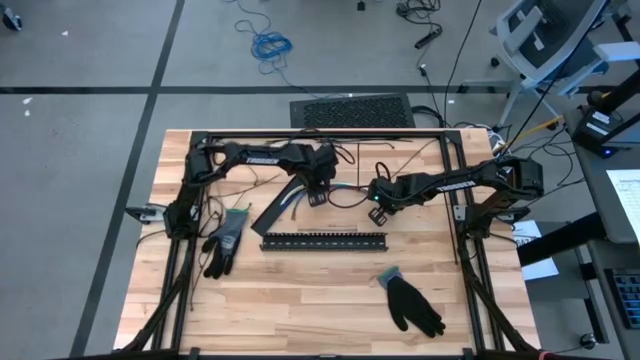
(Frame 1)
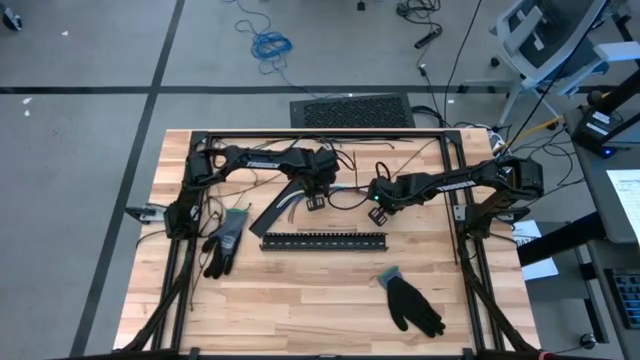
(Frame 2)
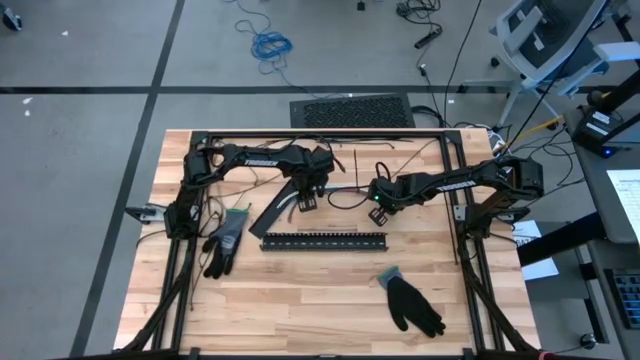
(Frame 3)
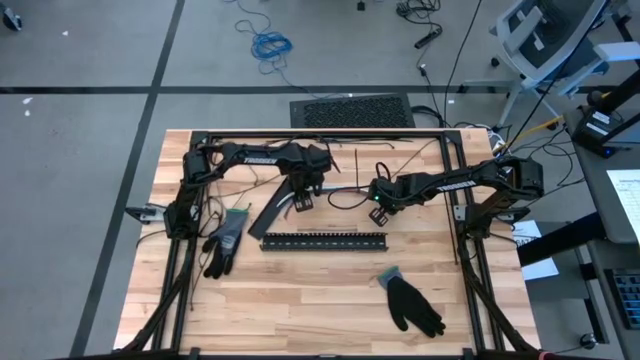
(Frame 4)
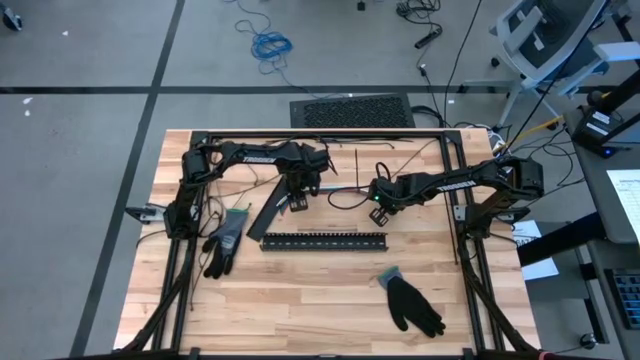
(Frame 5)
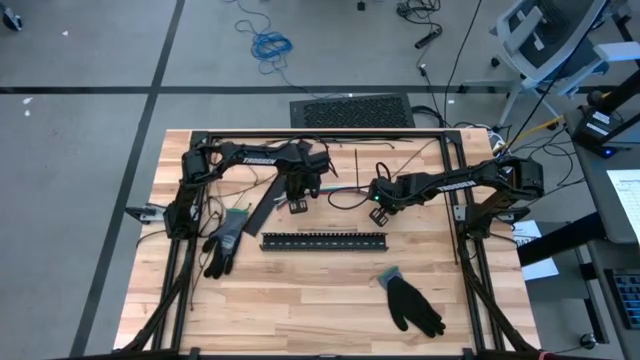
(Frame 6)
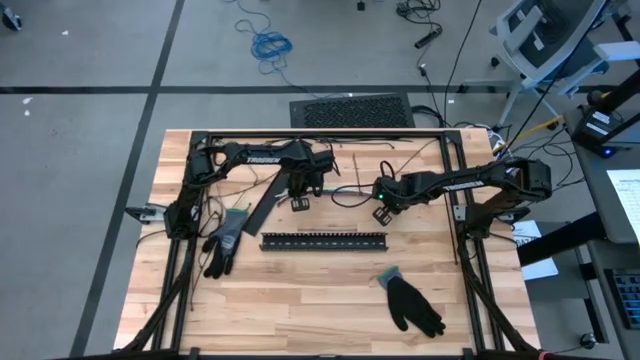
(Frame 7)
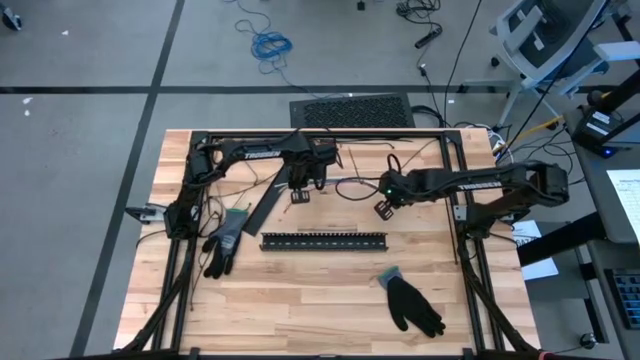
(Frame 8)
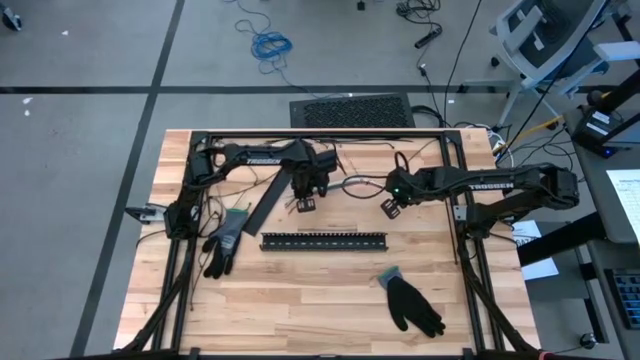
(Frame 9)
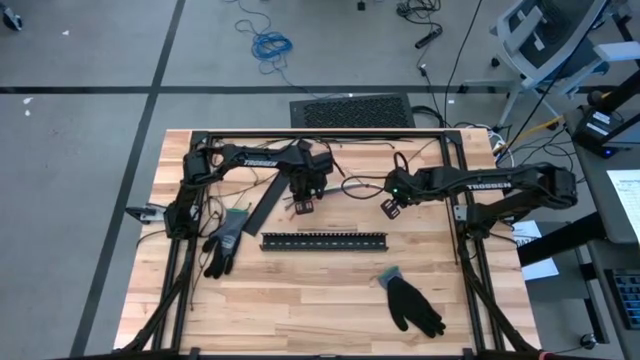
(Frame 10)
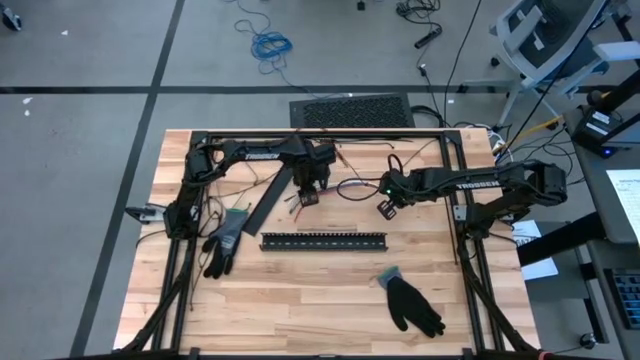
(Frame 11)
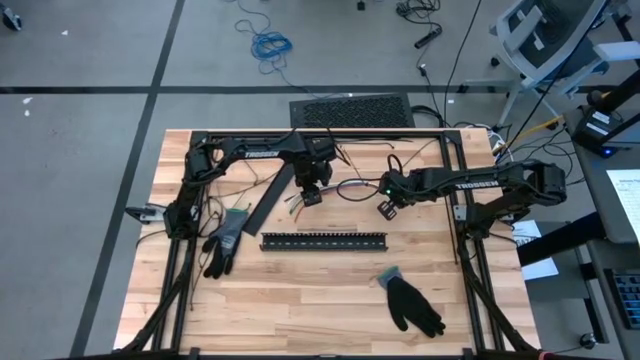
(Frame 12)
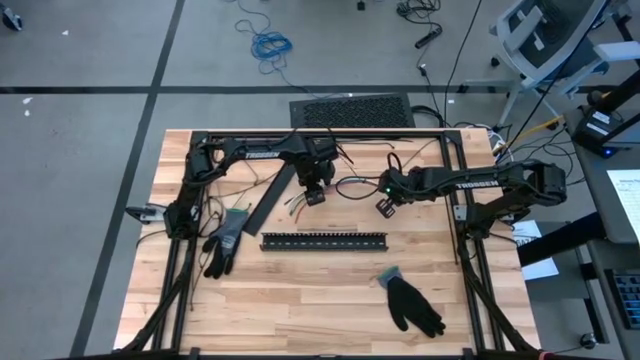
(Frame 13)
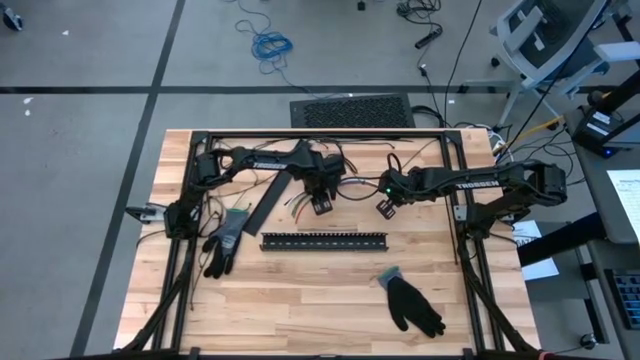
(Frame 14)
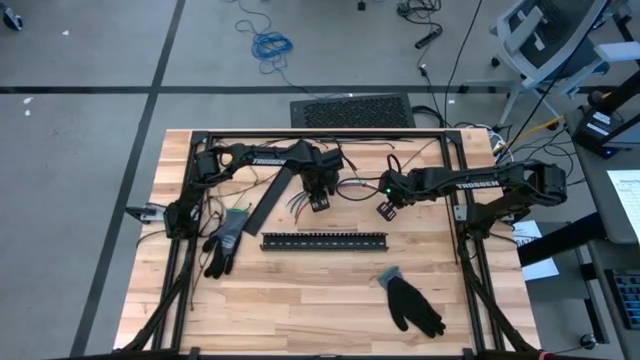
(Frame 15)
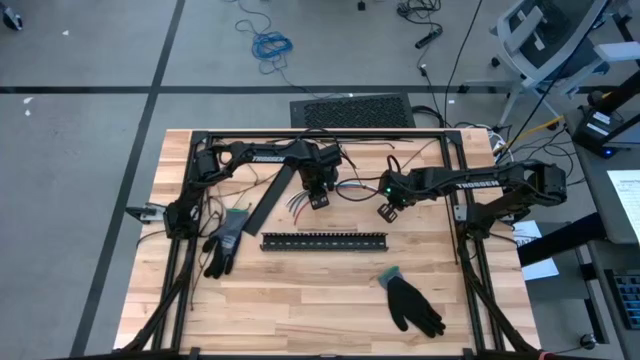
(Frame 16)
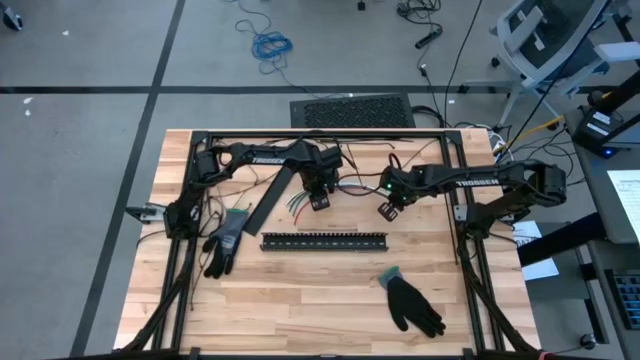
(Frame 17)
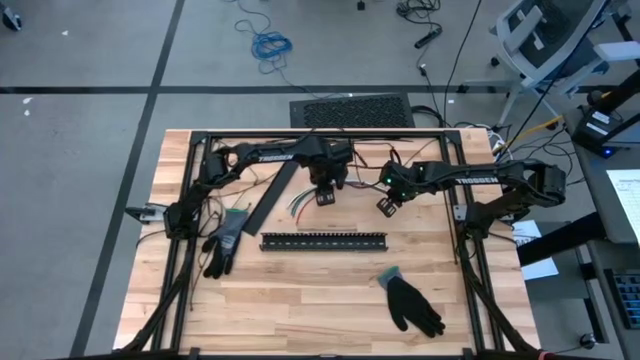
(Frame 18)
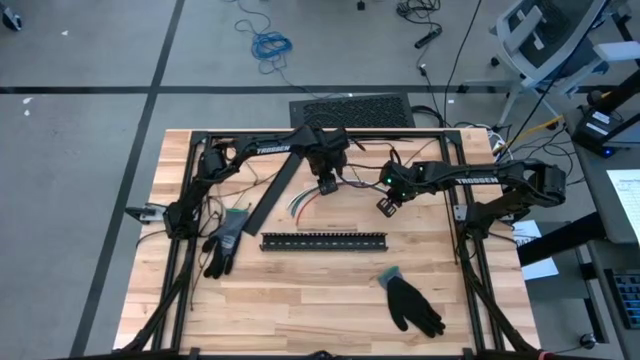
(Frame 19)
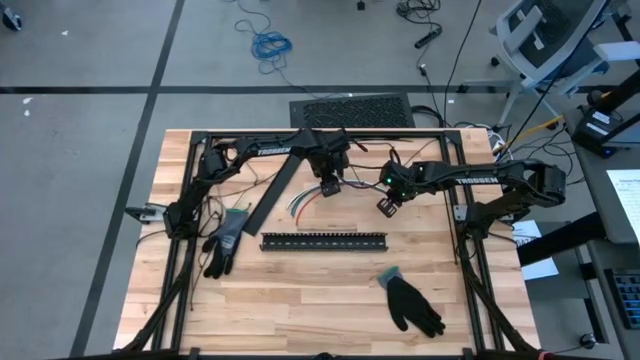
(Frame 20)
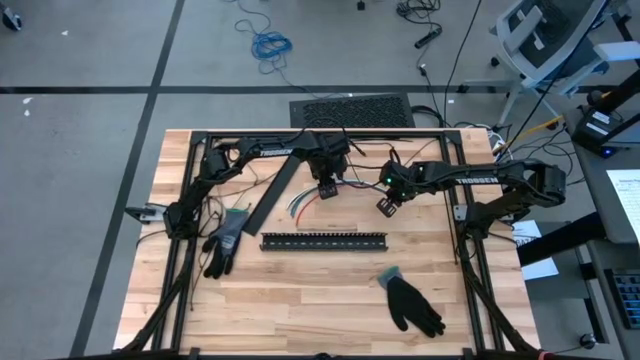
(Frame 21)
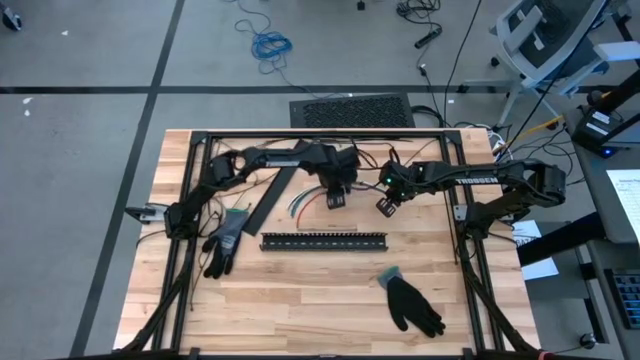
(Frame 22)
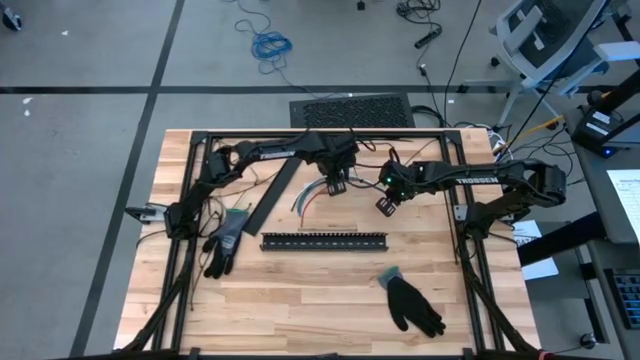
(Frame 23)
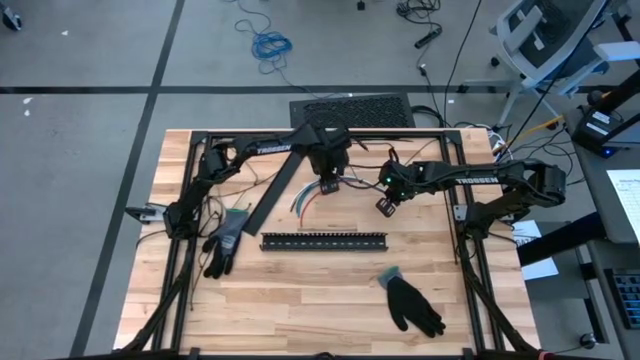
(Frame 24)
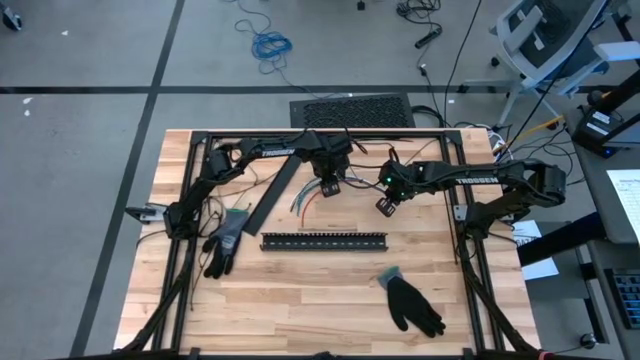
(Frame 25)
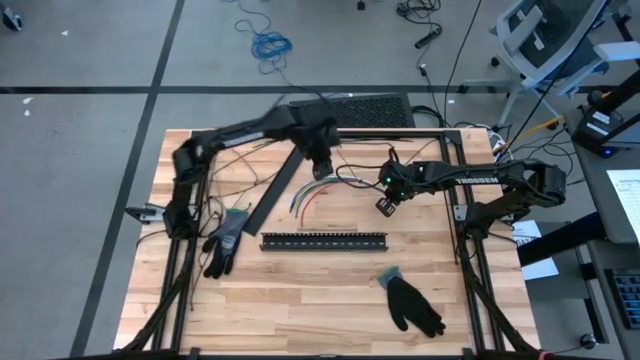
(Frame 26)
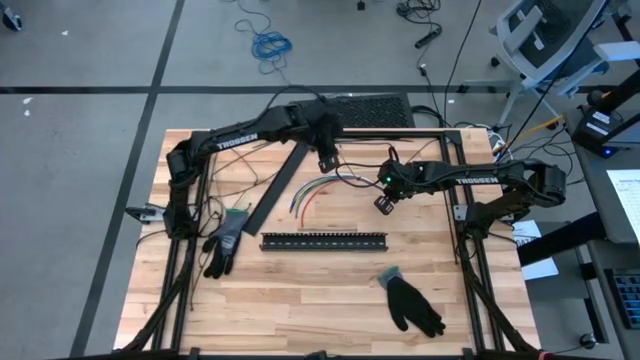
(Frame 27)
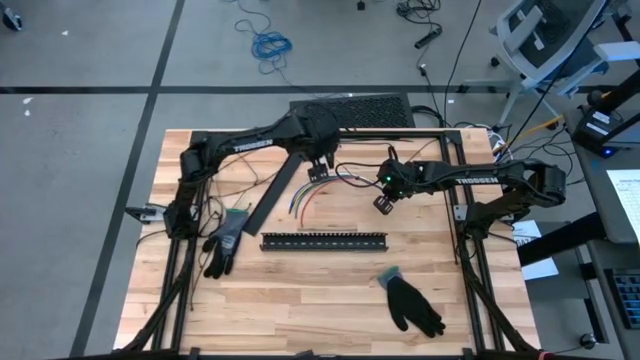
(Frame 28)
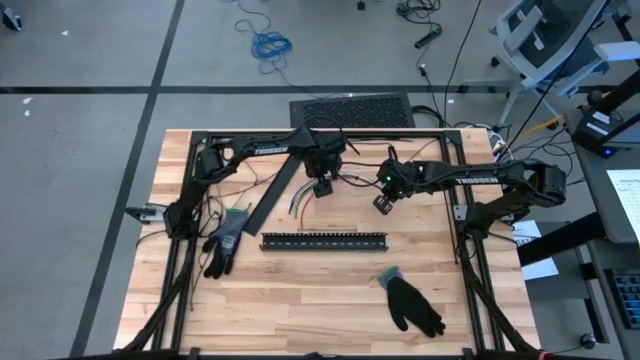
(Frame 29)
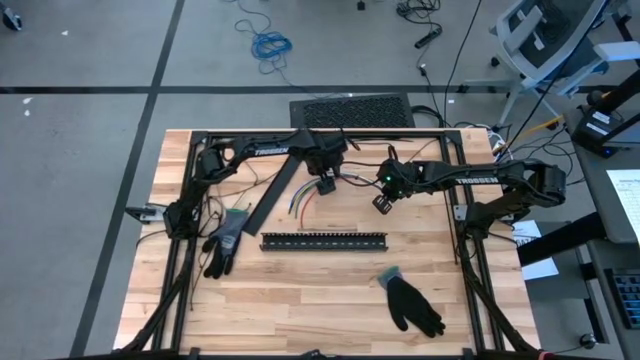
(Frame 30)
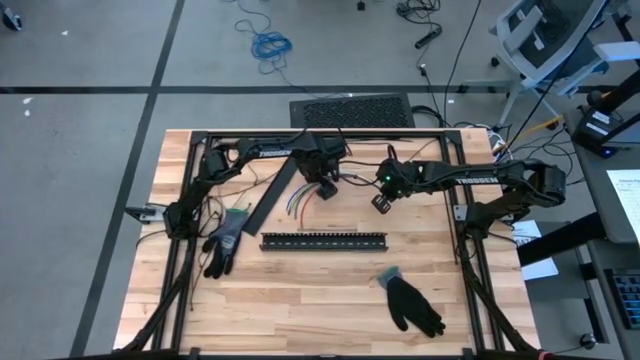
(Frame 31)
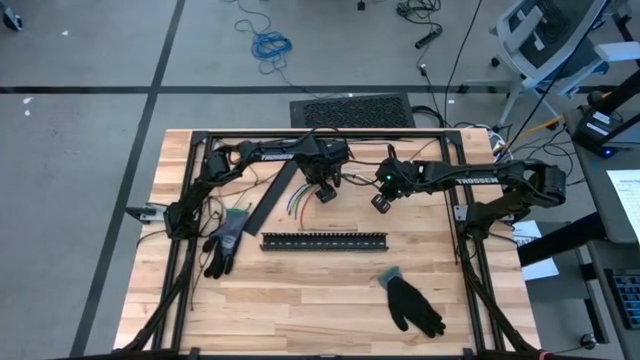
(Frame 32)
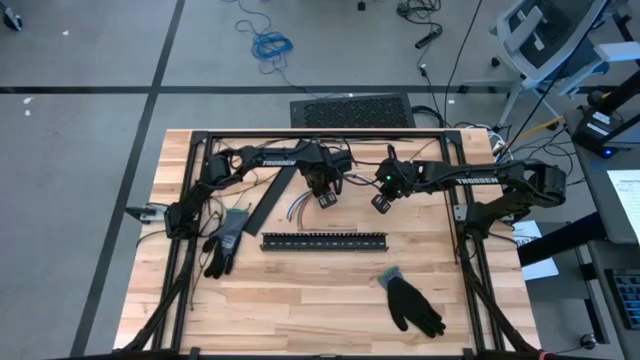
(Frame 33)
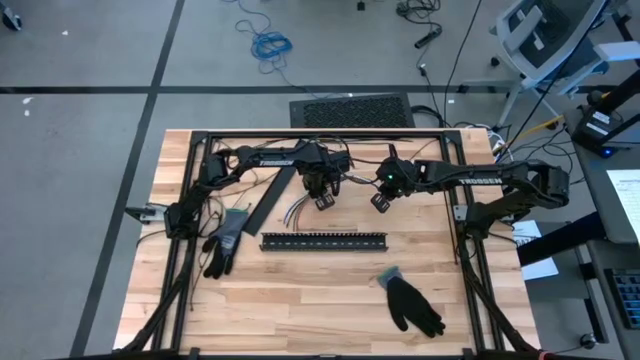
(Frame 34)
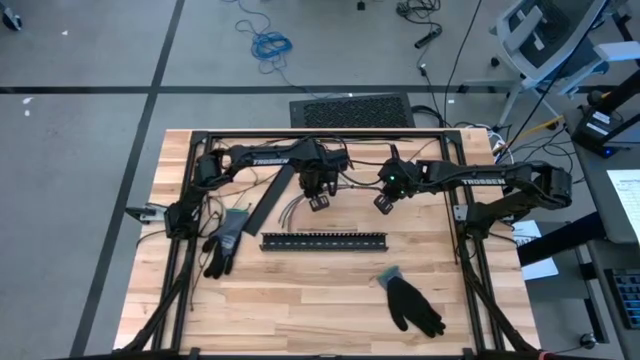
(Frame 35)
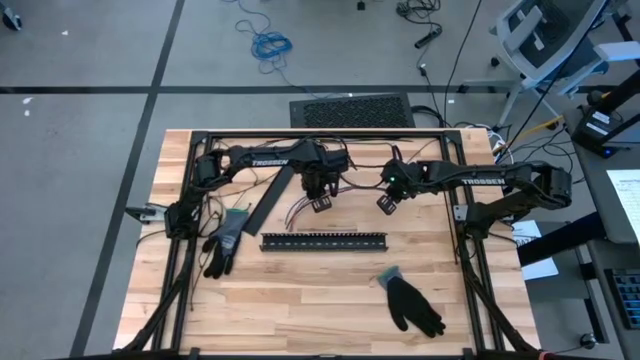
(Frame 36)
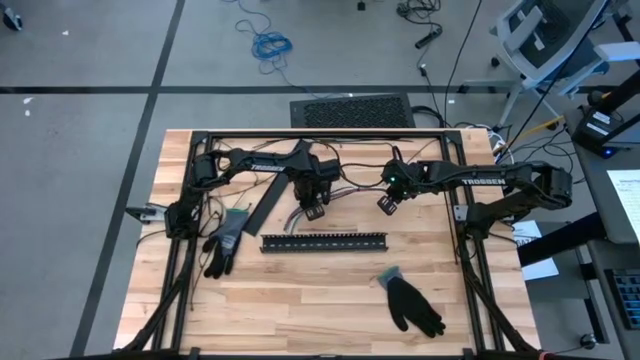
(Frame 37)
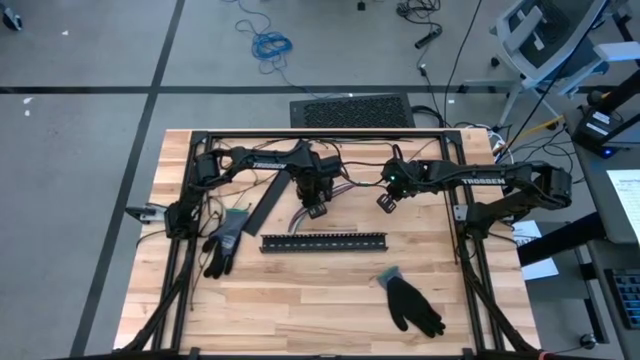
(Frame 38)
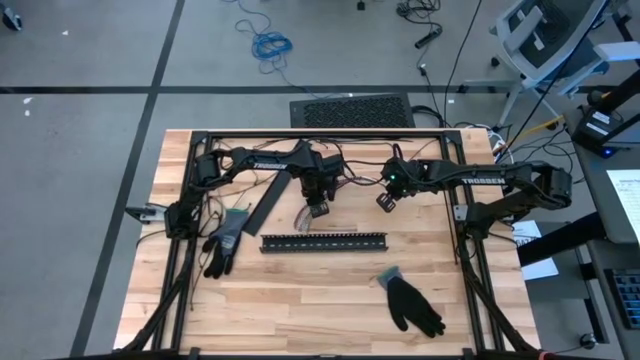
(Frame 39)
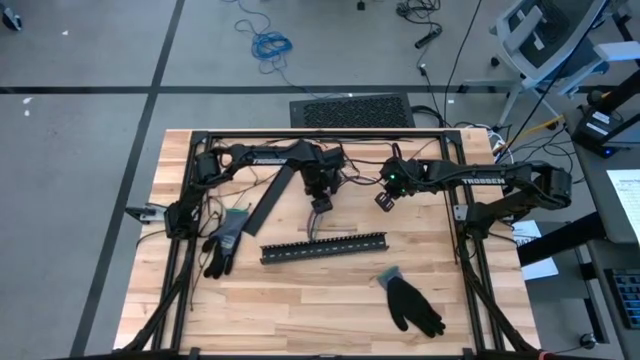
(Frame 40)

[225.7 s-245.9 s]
Task: Ziptie cables
Put the ziptied cable wires into the cable duct
